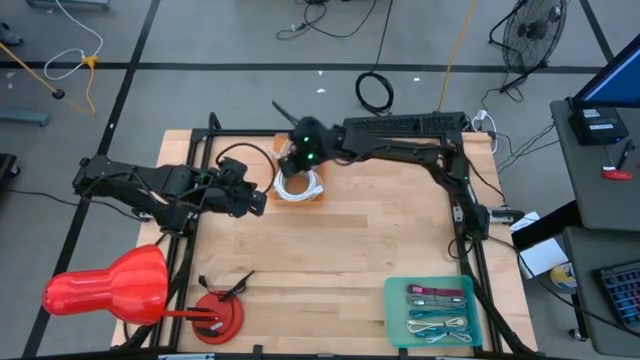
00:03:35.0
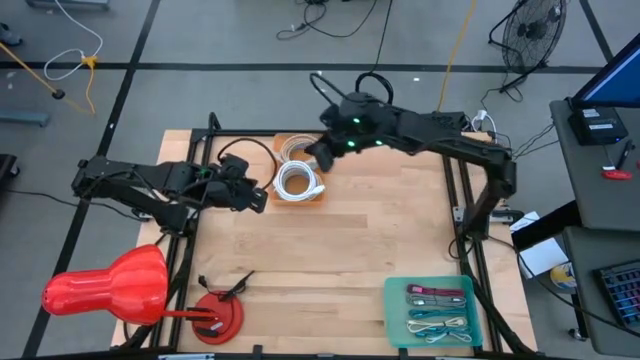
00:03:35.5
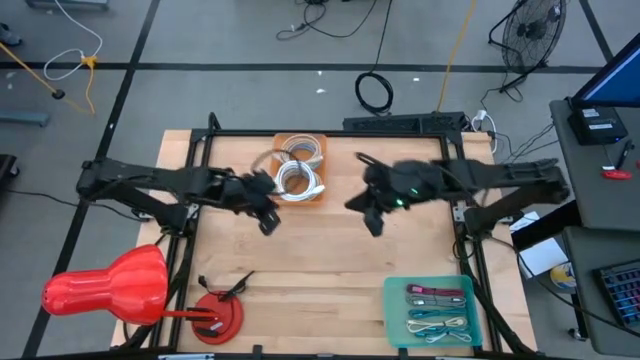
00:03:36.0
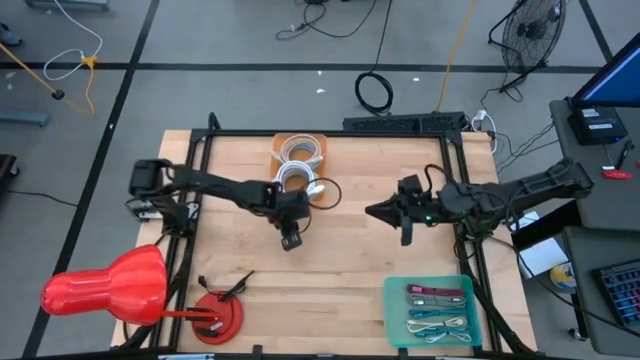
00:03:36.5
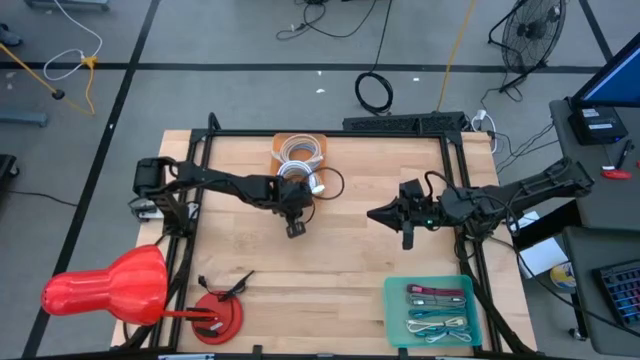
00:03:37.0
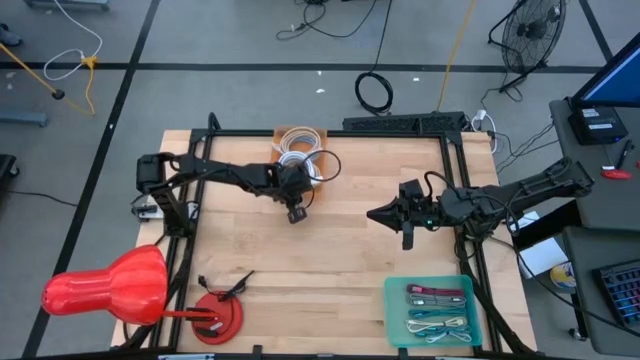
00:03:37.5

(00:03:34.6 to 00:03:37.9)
Task: Pick & Place USB Port
Move the orange bin to the middle top of the table

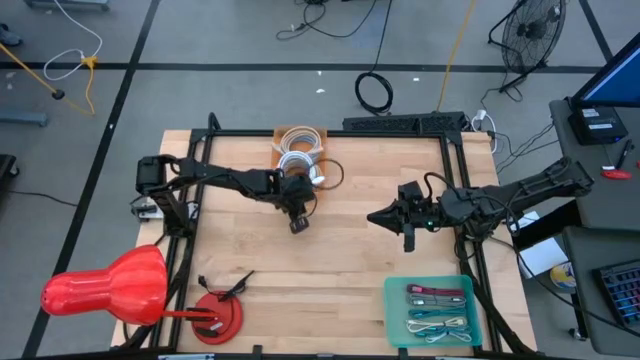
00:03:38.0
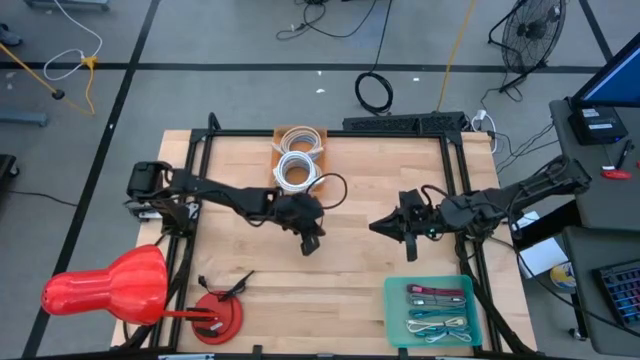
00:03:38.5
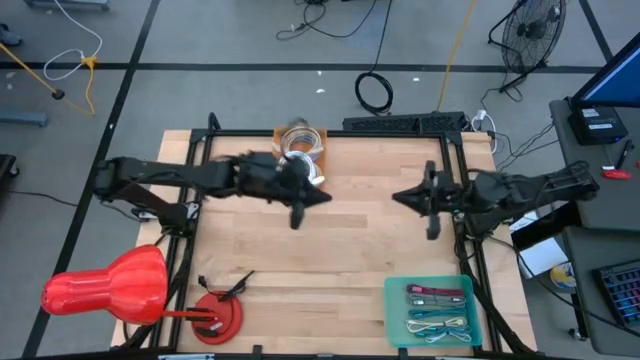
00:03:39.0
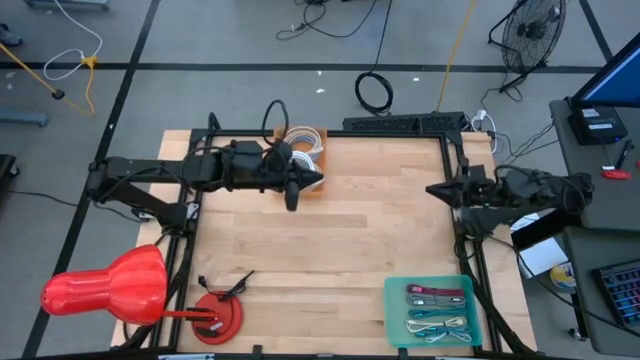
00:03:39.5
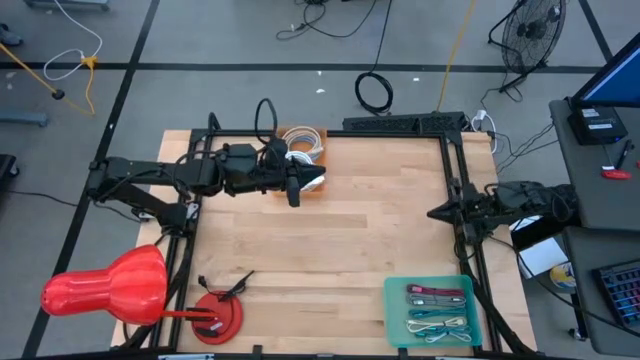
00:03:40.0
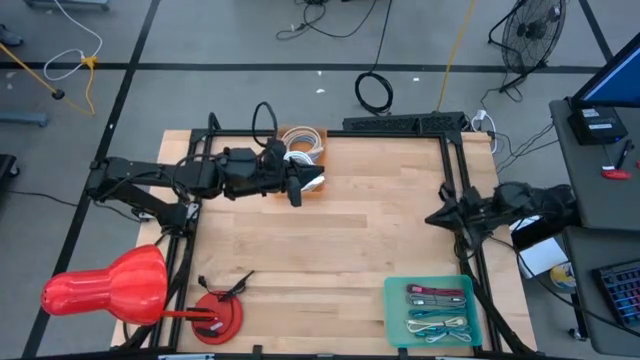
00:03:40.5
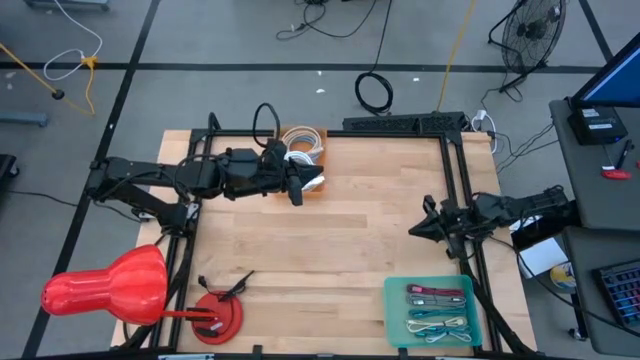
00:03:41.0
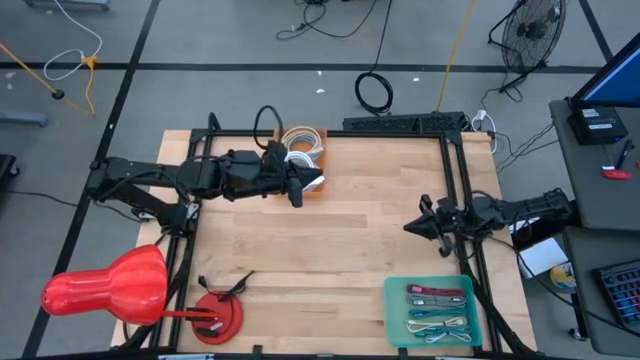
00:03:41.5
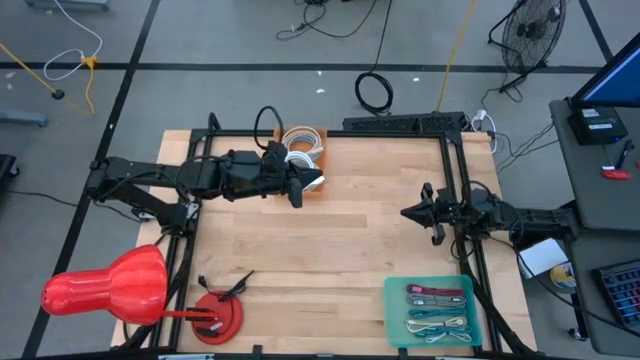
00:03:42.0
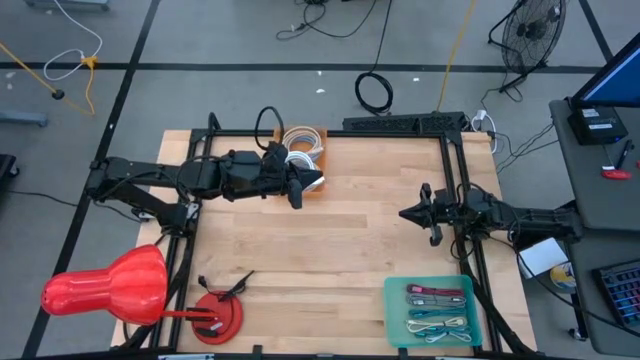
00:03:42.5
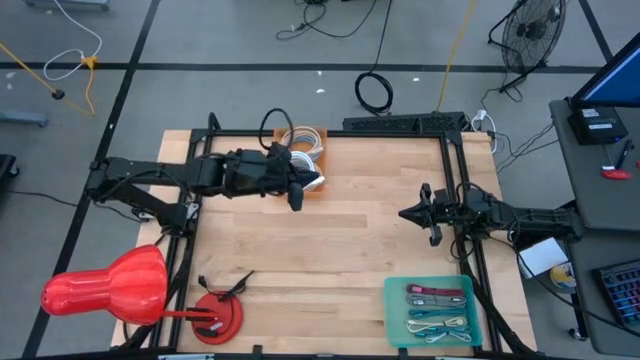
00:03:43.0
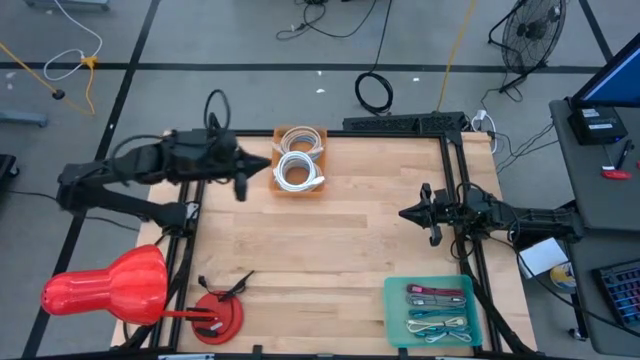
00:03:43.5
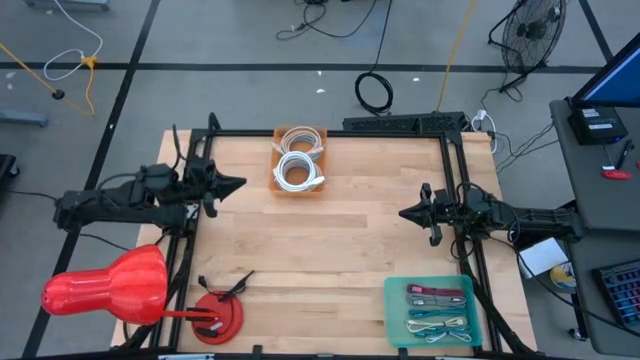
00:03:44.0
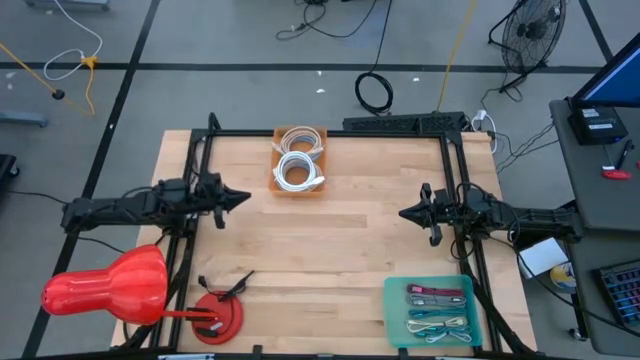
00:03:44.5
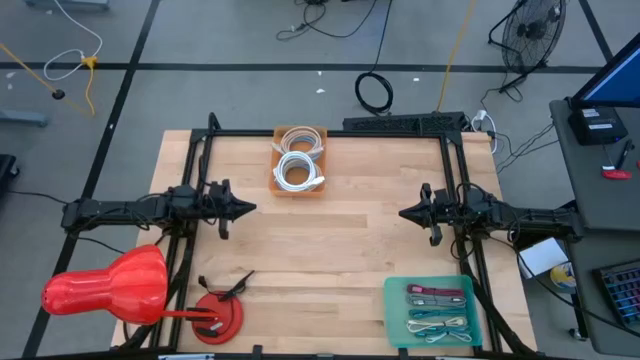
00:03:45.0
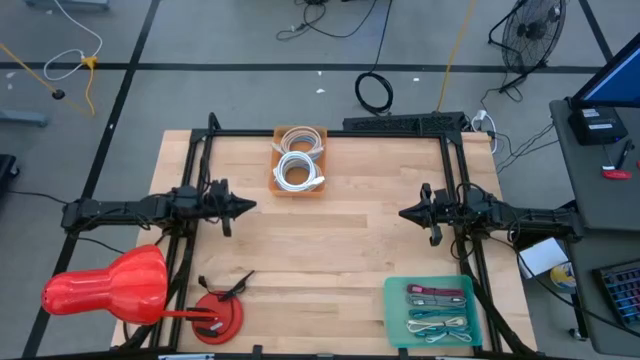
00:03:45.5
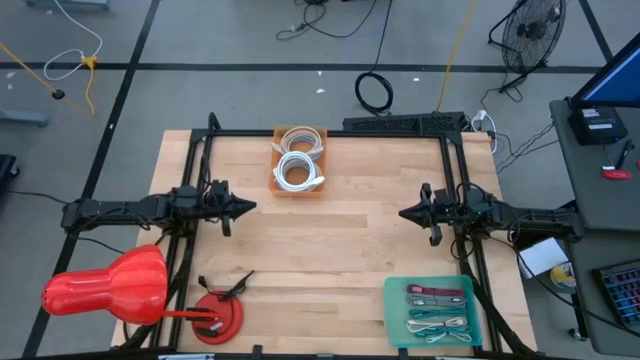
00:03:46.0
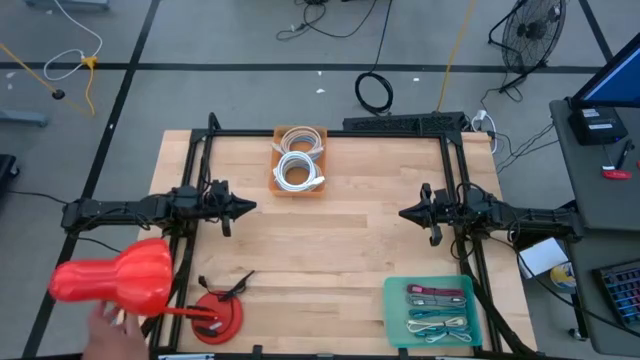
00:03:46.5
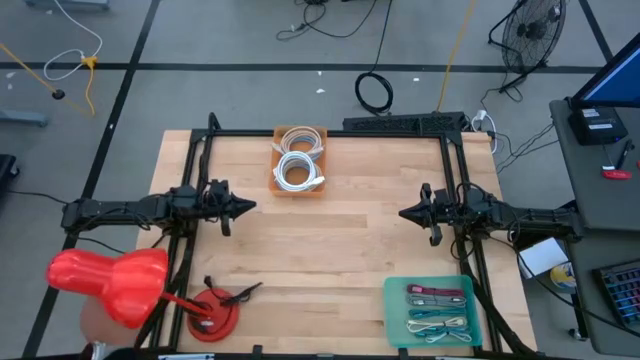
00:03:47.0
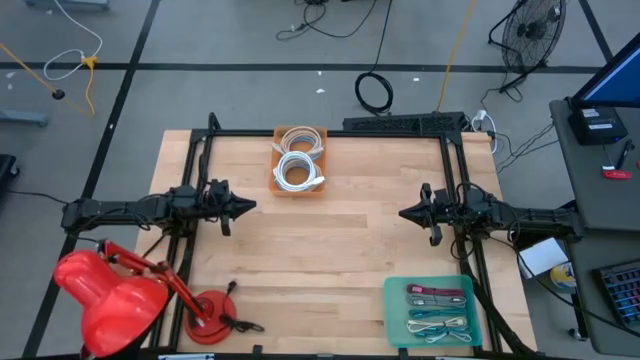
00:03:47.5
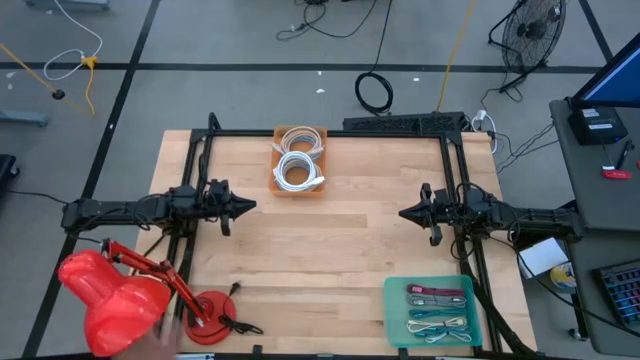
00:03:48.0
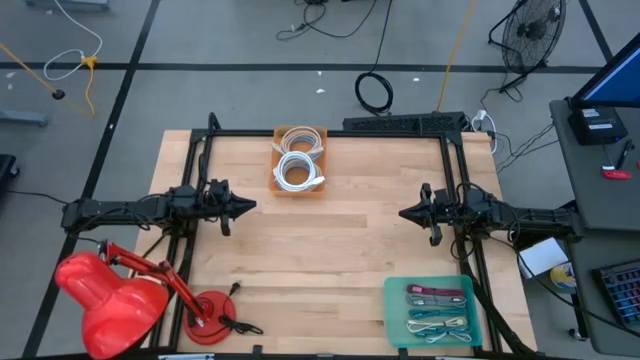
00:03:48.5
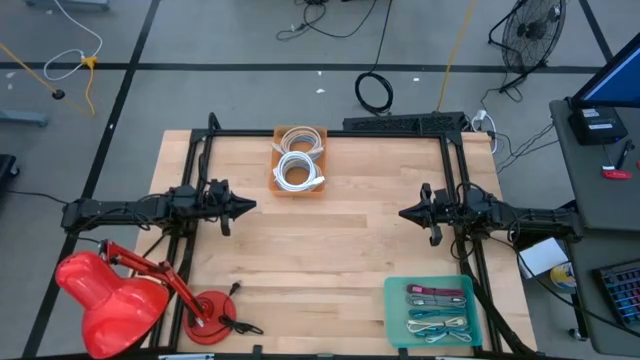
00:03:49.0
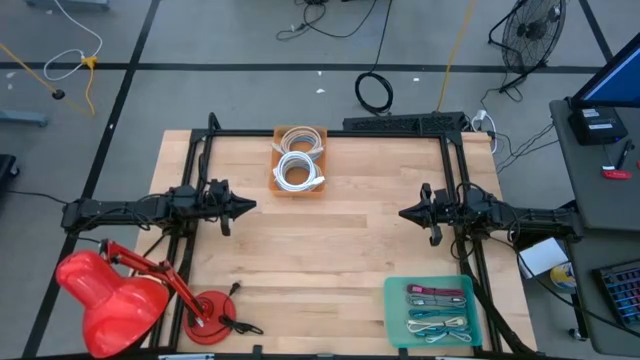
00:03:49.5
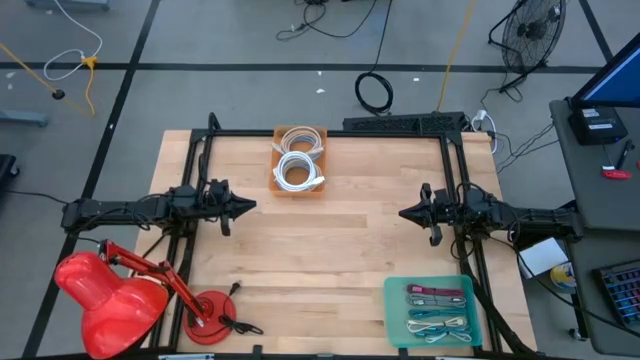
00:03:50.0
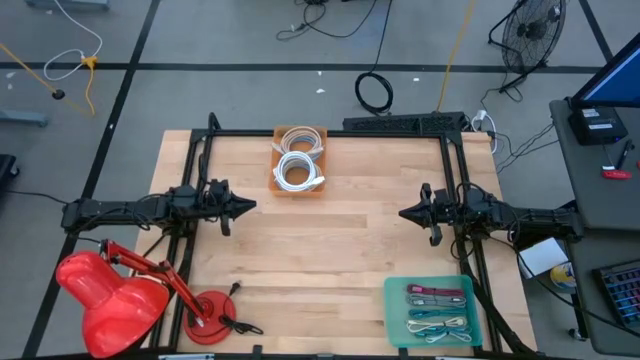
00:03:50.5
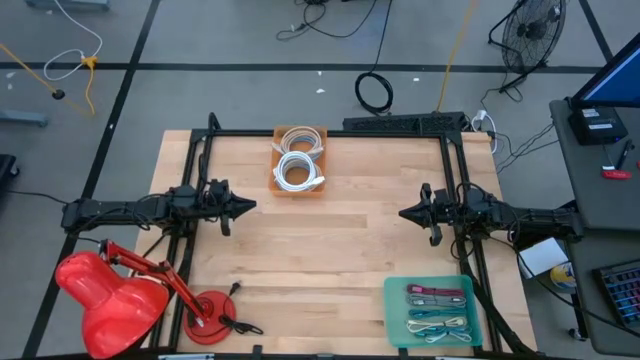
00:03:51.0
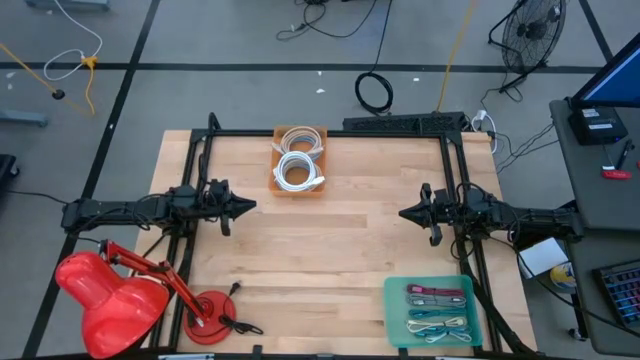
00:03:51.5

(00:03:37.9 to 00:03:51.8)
Return to Home Position
